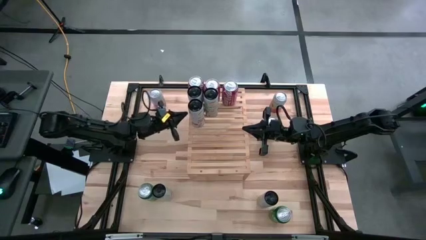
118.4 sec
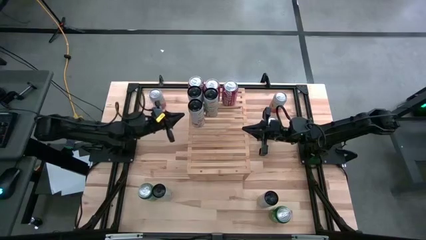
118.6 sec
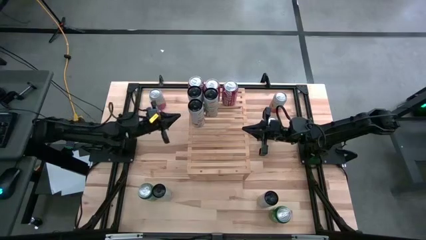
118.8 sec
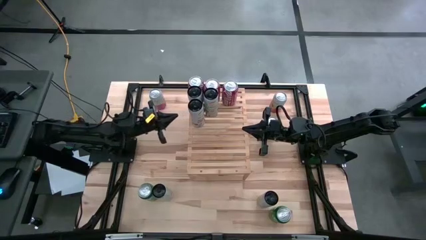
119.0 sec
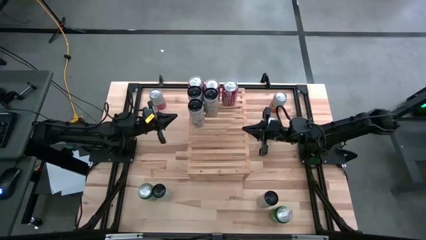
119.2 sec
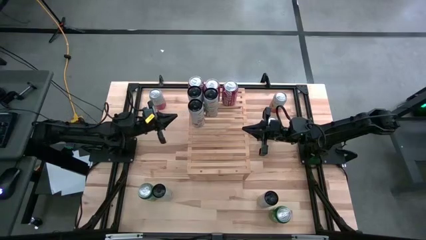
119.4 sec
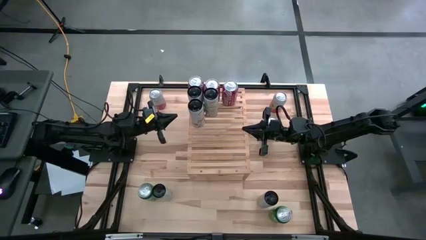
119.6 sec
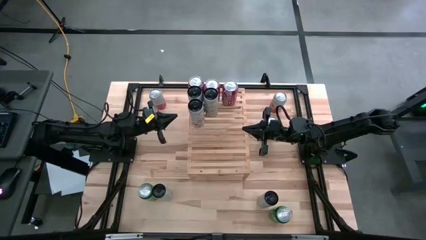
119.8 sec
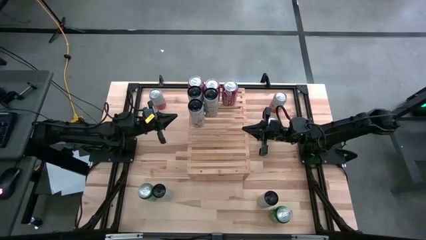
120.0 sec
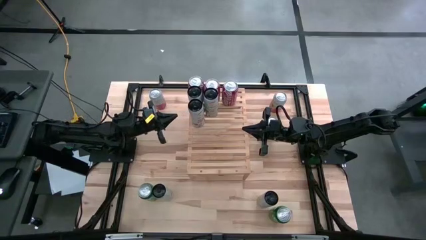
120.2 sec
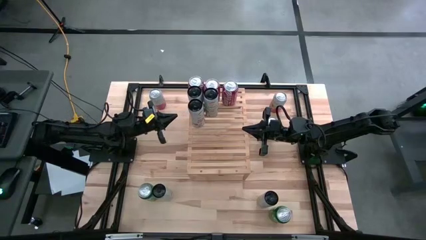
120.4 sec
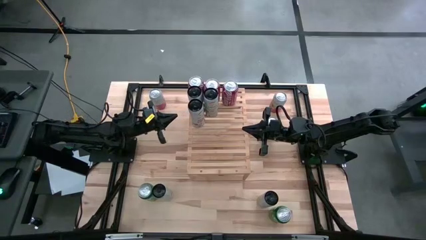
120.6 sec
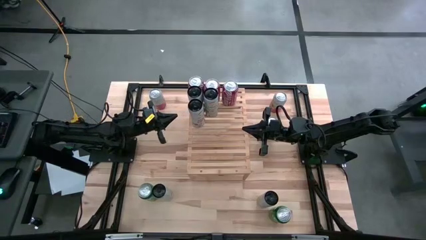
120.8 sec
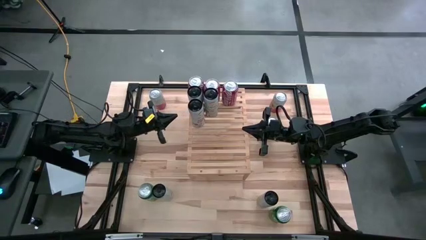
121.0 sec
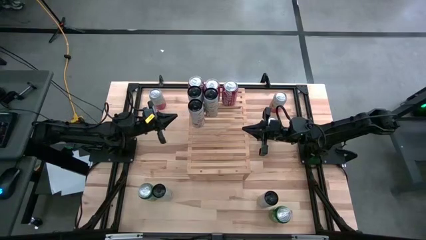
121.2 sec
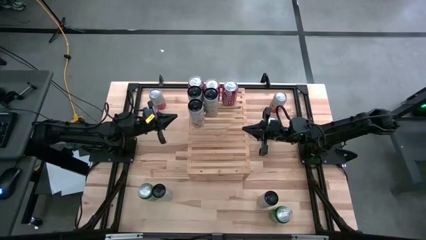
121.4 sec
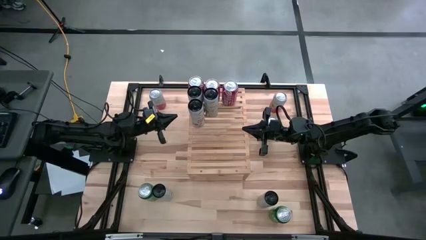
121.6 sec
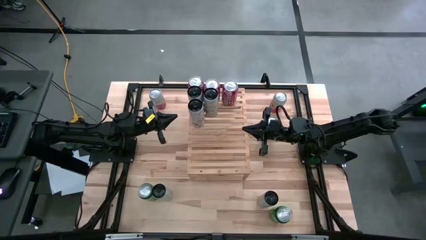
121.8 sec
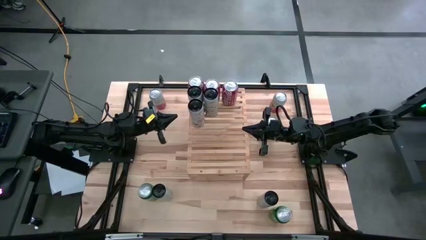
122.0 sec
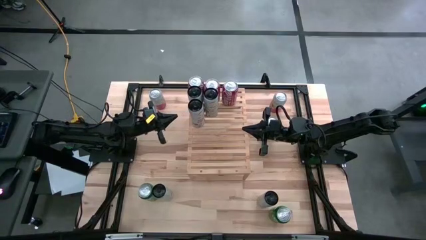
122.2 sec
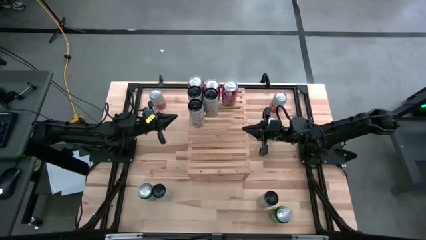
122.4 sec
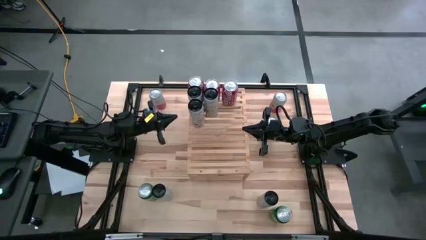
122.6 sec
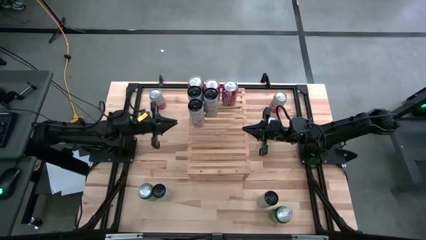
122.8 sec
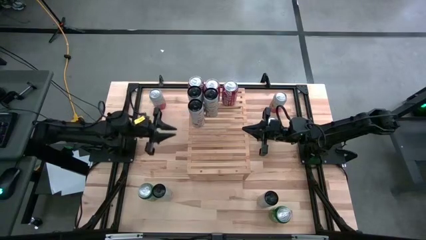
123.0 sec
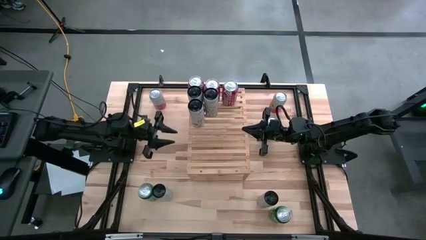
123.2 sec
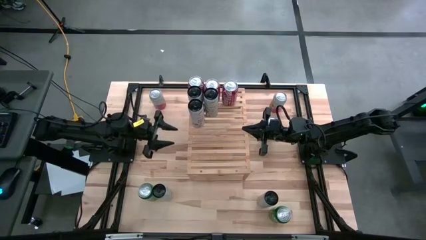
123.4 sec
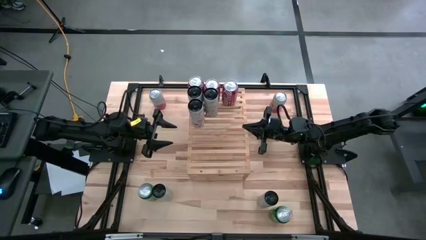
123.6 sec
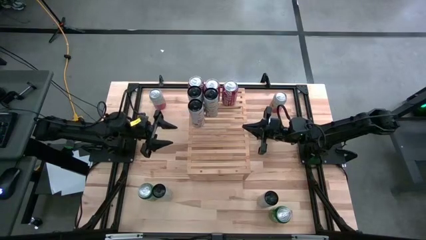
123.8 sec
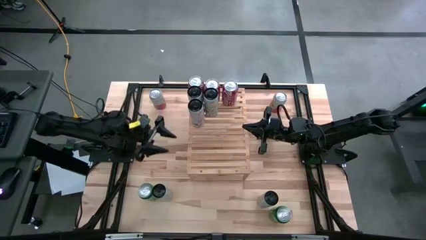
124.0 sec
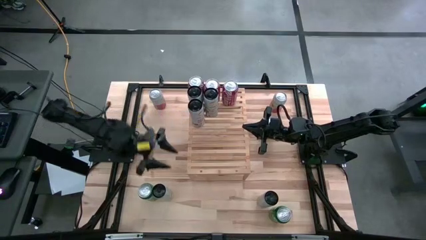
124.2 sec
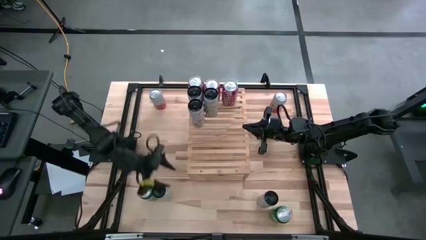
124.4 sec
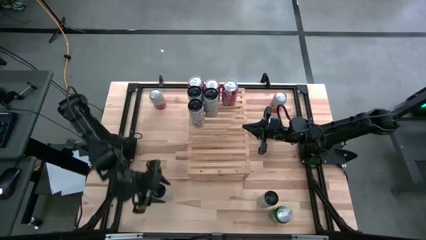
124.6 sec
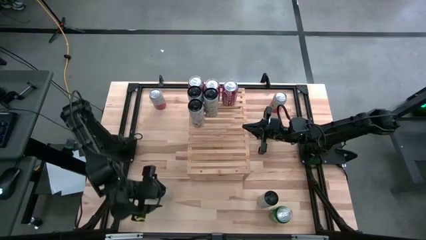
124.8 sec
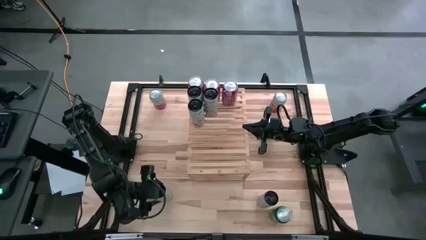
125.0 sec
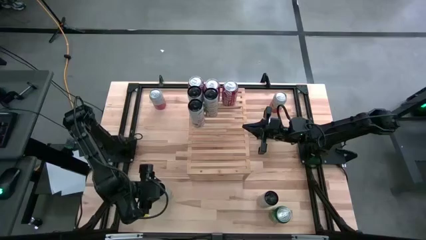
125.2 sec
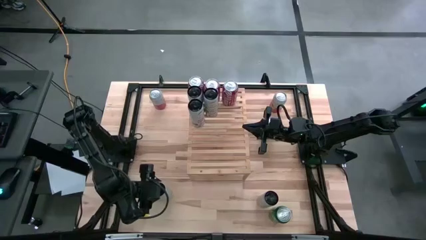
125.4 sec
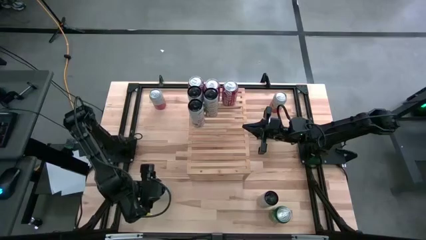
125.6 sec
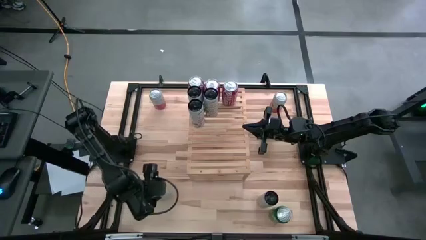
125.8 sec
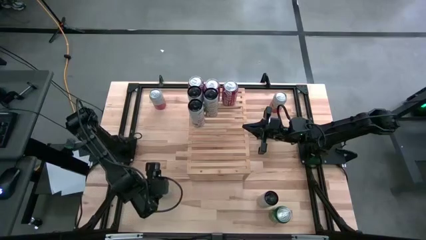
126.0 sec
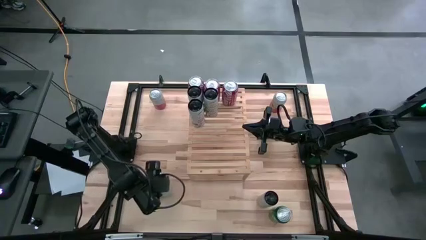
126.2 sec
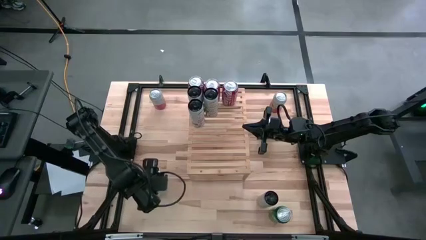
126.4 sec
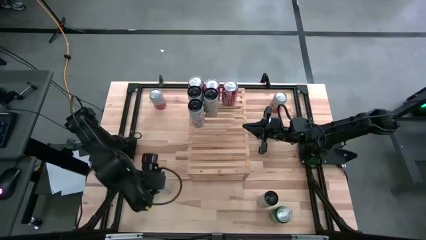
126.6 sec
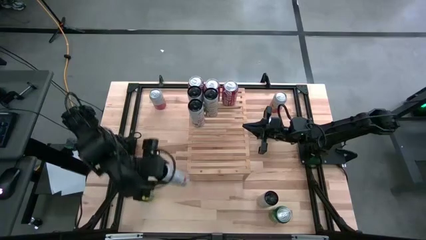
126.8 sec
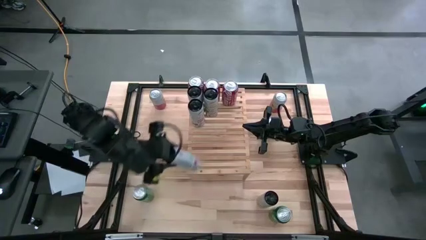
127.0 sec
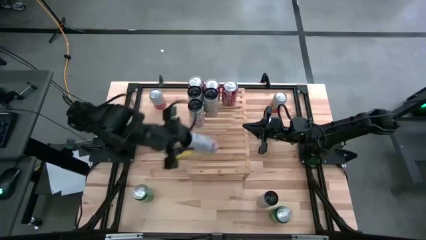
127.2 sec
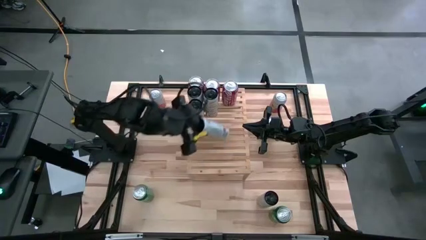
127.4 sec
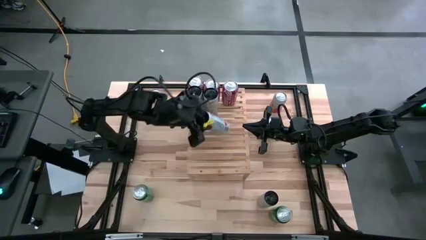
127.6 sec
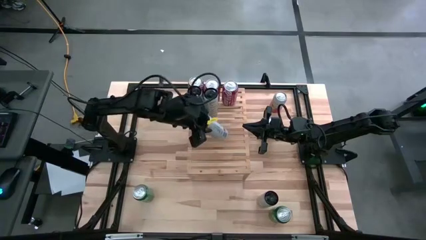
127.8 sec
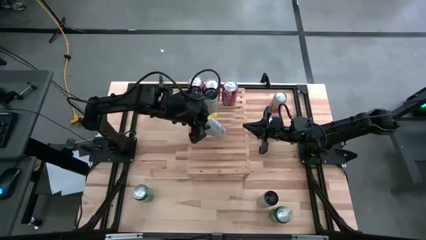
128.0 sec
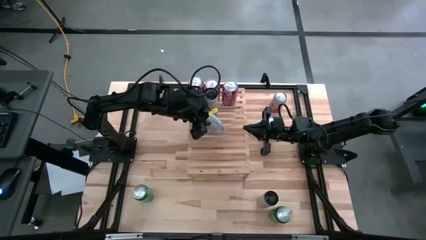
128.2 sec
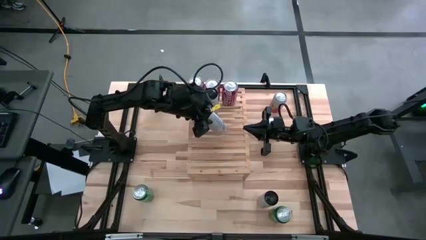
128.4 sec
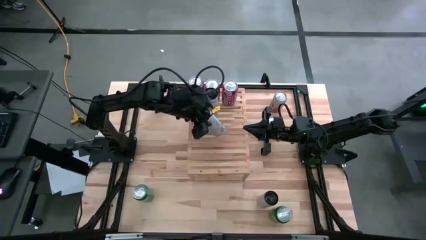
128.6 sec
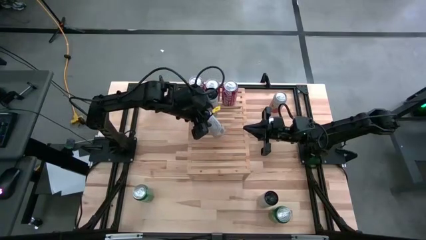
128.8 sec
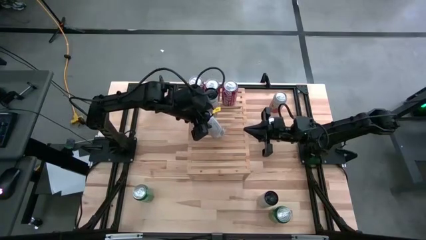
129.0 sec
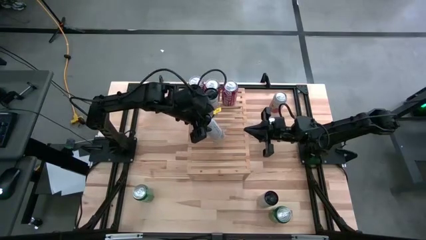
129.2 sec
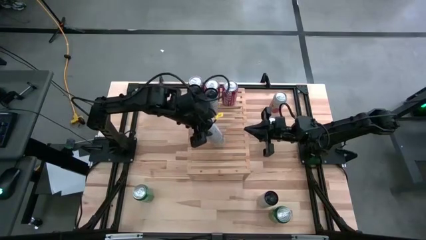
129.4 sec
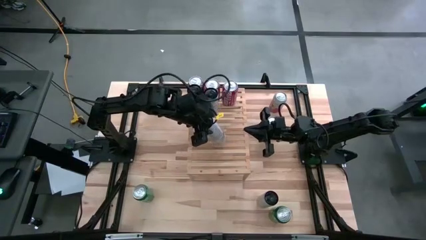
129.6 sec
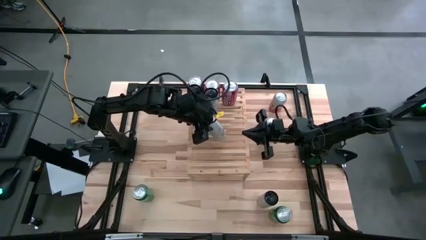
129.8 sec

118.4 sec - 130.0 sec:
Task: Place canned beverage on shelf
Align the bottom left peach vibe celsius soda can with the other peach vibe celsius soda can

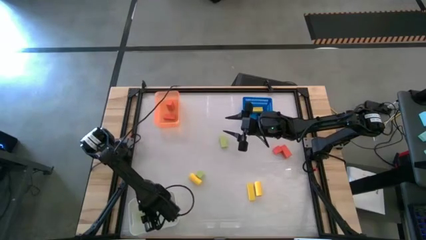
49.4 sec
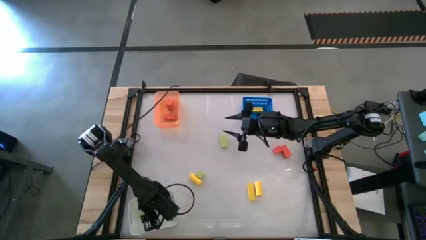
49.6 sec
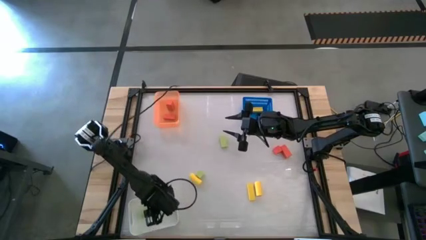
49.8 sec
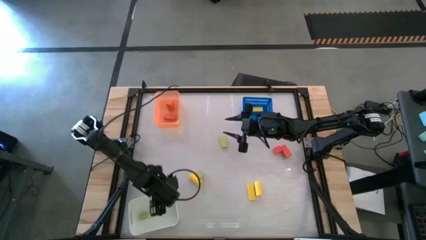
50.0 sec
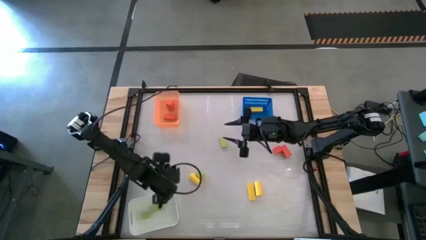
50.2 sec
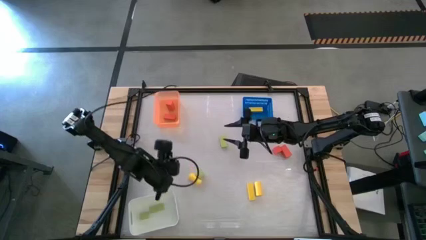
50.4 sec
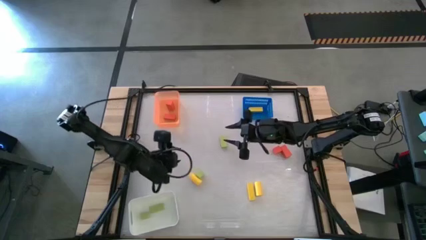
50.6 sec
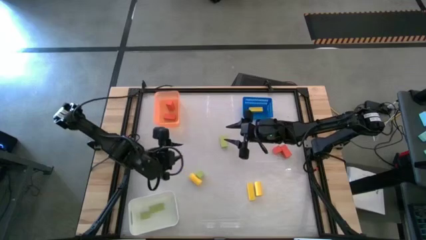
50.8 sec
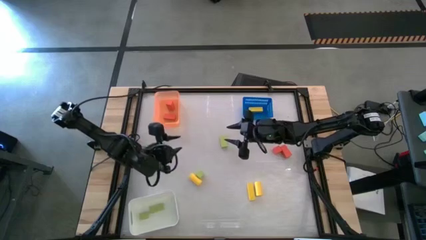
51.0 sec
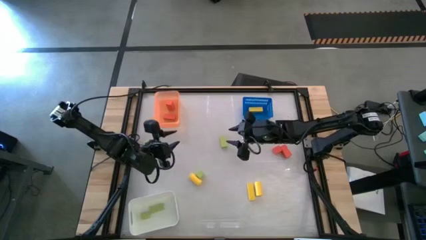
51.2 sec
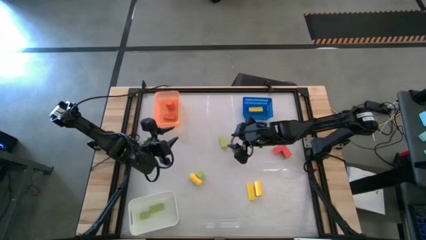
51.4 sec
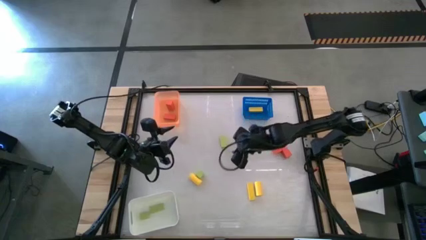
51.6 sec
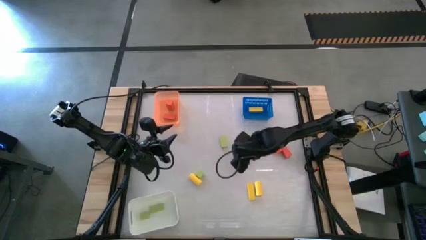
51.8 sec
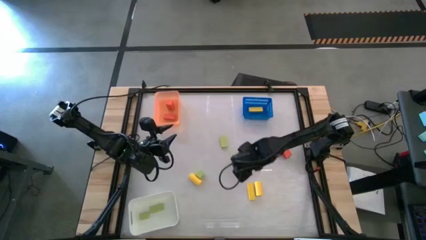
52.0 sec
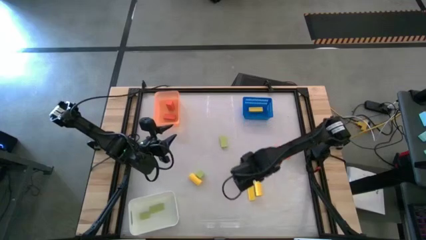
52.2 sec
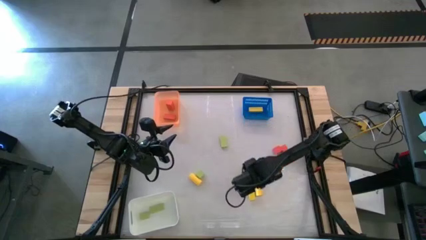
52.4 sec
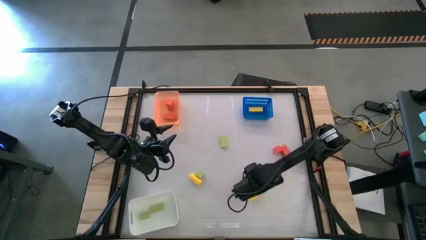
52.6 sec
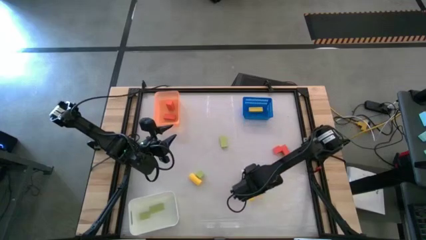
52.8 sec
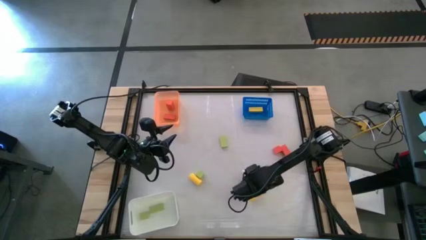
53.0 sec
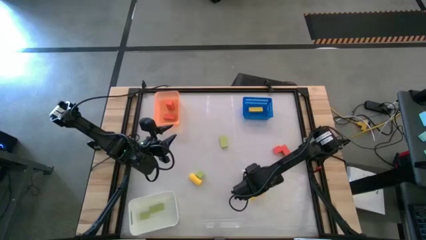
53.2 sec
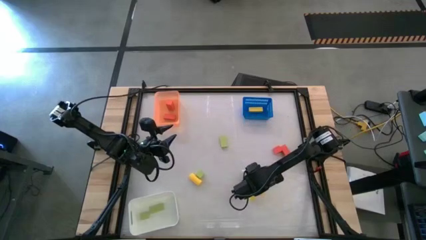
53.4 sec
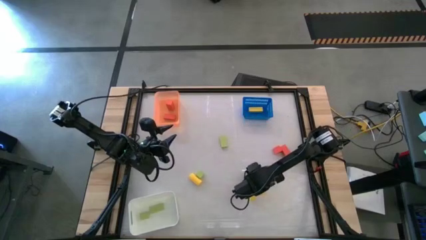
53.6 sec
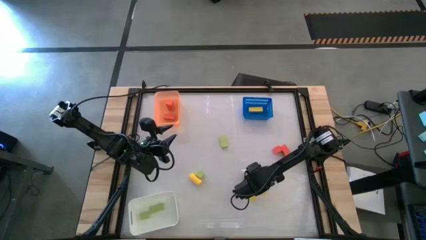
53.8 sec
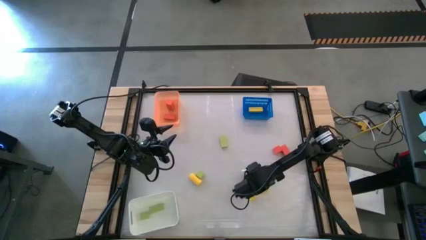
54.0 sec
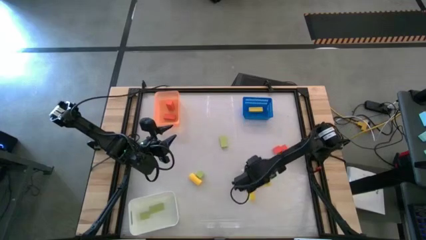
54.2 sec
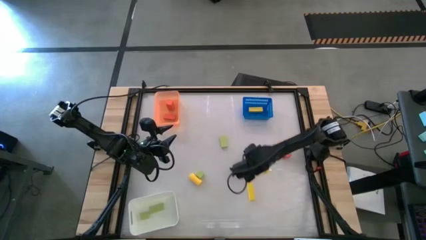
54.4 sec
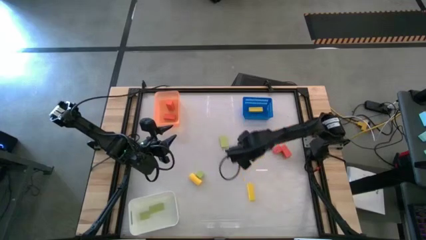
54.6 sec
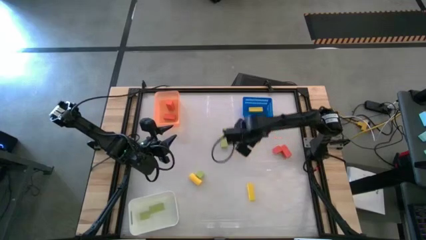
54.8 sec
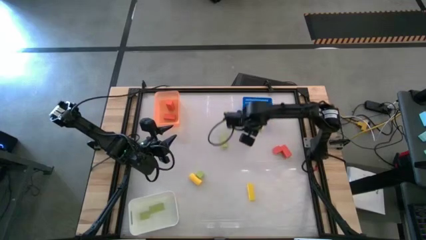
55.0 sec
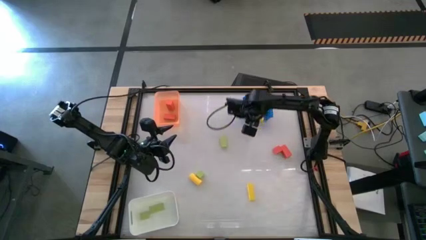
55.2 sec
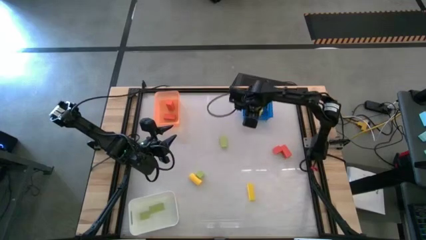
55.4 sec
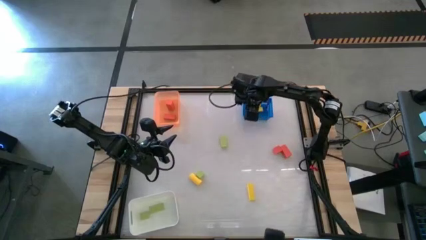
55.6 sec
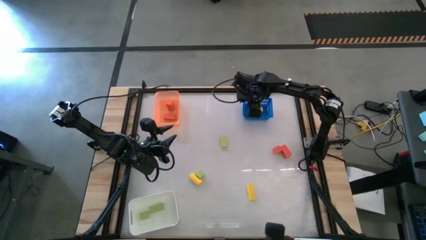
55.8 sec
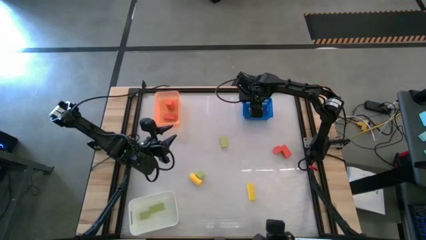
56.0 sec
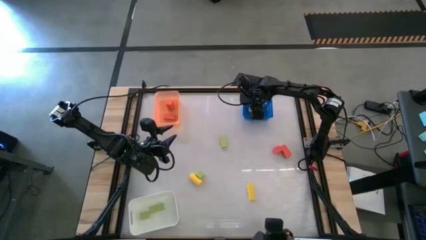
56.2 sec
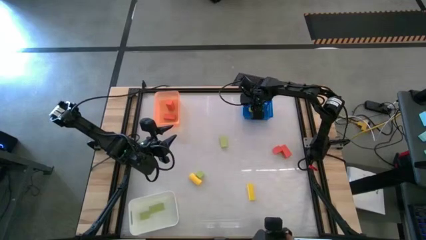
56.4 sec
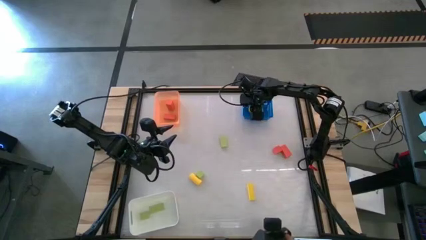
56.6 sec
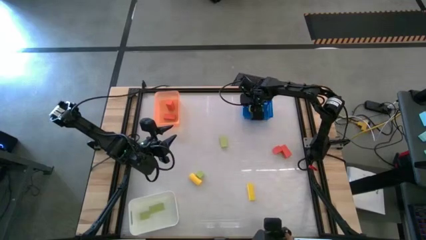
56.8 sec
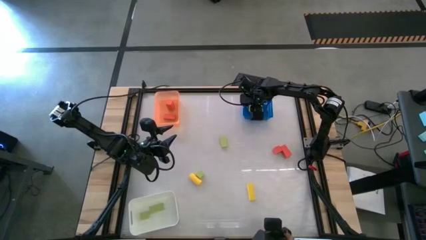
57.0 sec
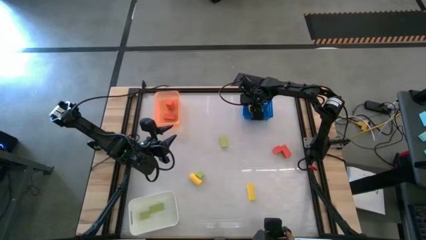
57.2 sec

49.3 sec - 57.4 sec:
Task: Sort & place blocks by color
Put the yellow wooden block into the blue basket
